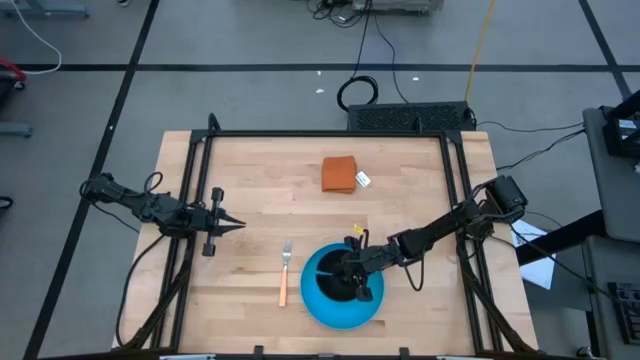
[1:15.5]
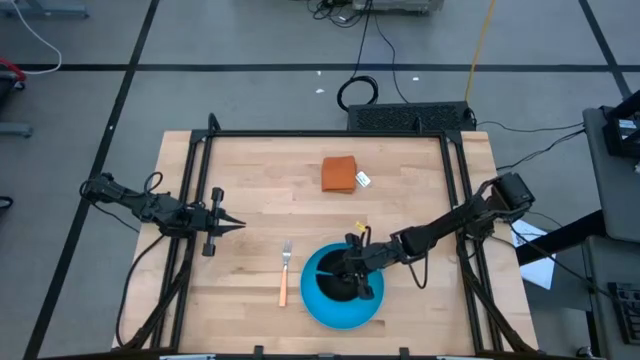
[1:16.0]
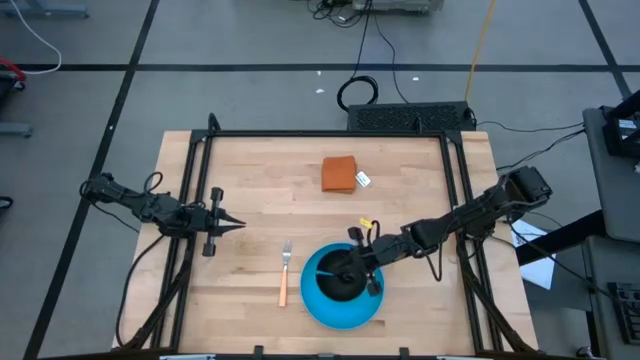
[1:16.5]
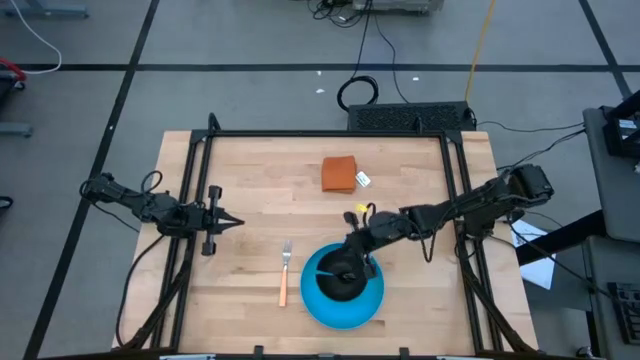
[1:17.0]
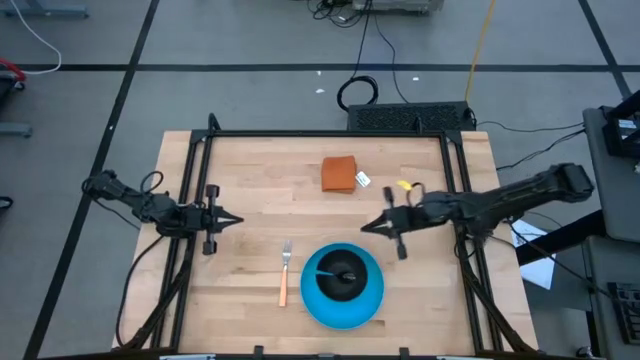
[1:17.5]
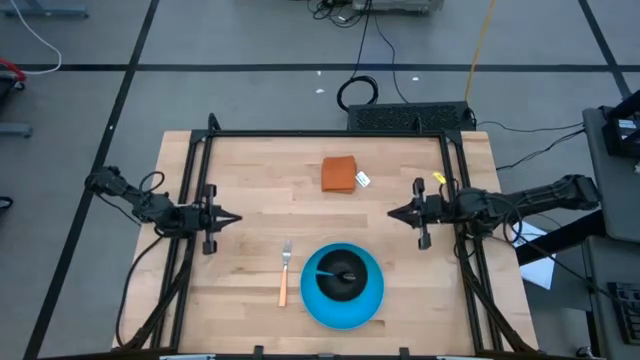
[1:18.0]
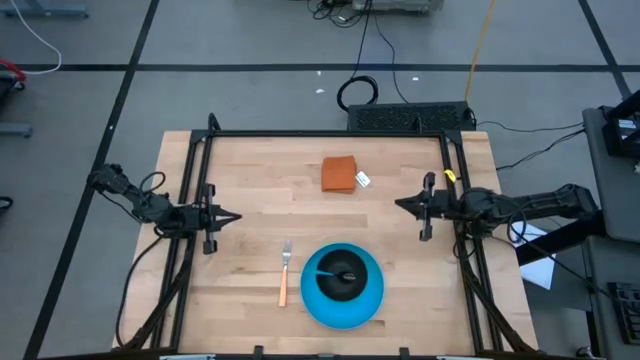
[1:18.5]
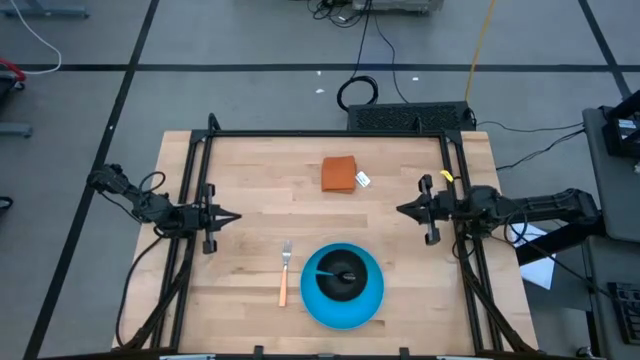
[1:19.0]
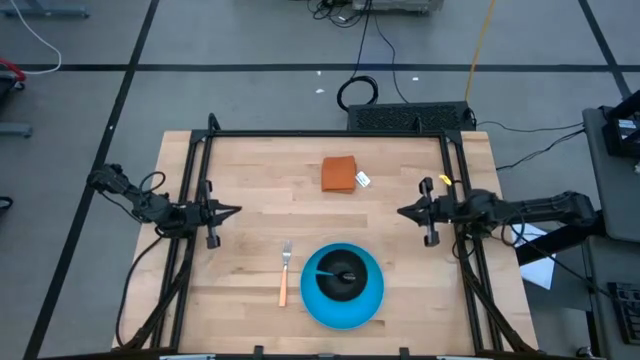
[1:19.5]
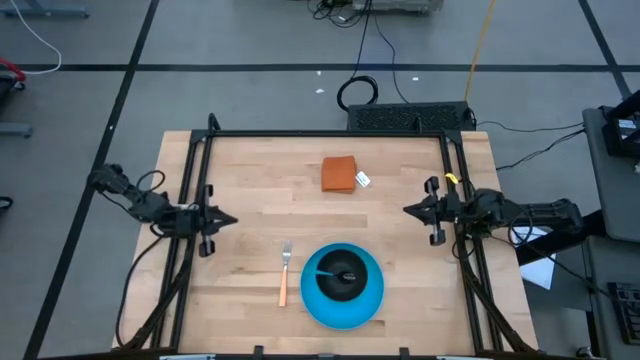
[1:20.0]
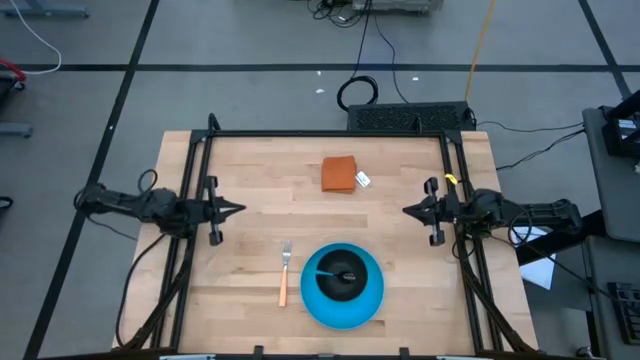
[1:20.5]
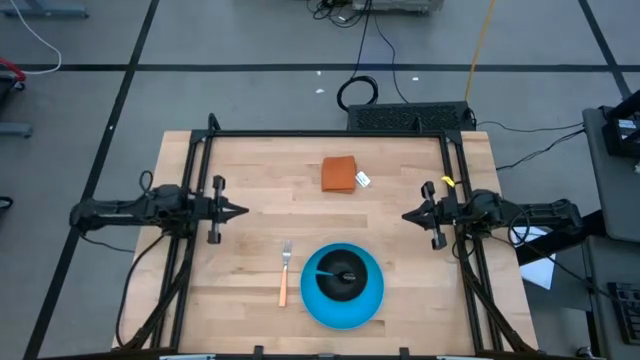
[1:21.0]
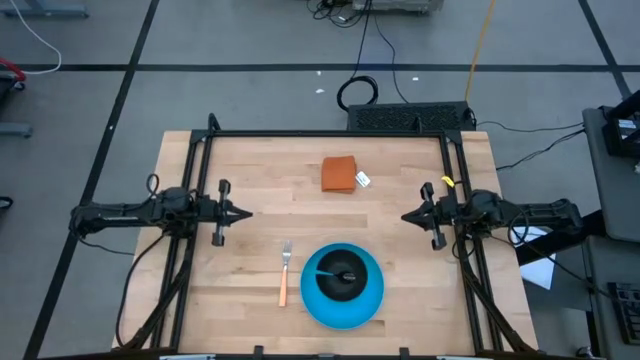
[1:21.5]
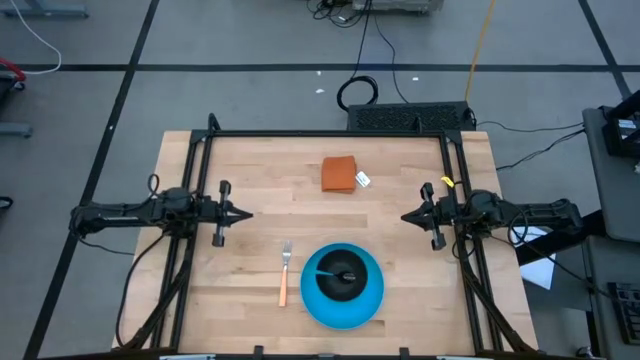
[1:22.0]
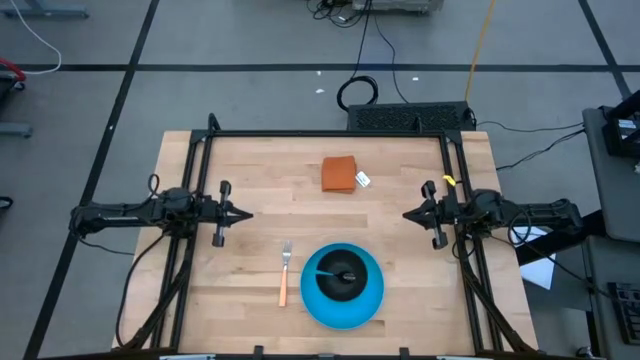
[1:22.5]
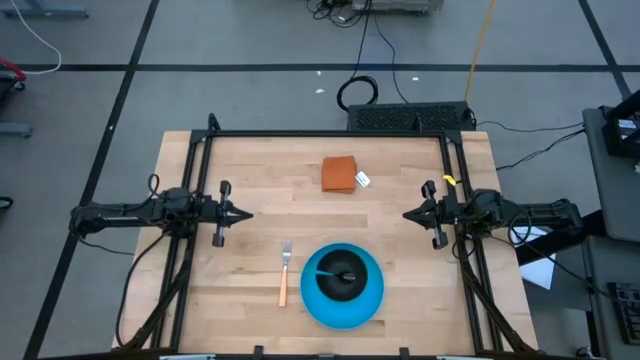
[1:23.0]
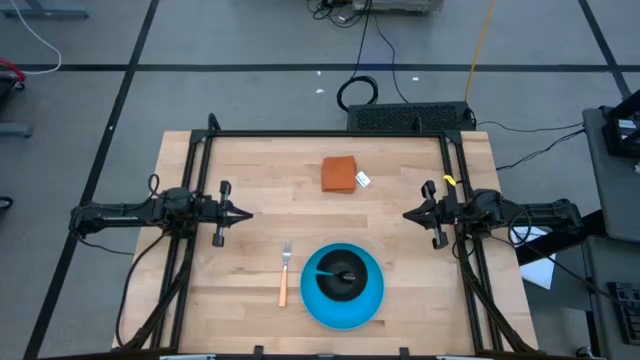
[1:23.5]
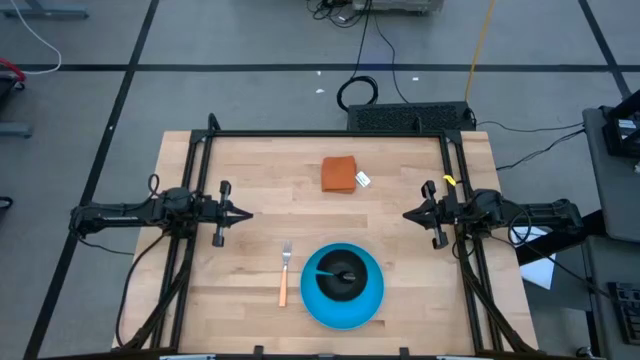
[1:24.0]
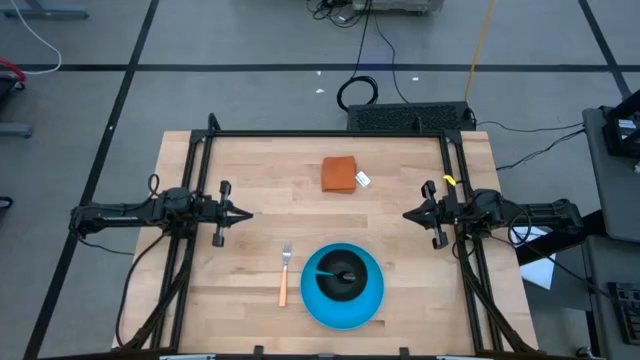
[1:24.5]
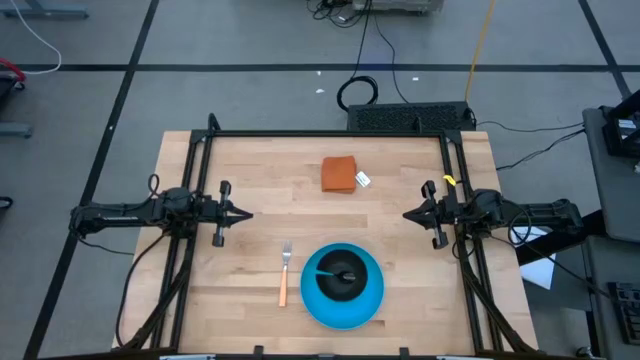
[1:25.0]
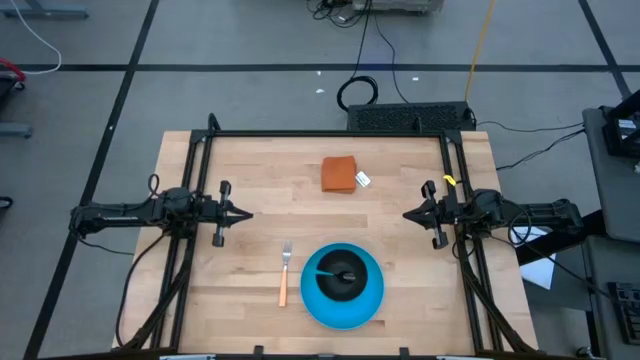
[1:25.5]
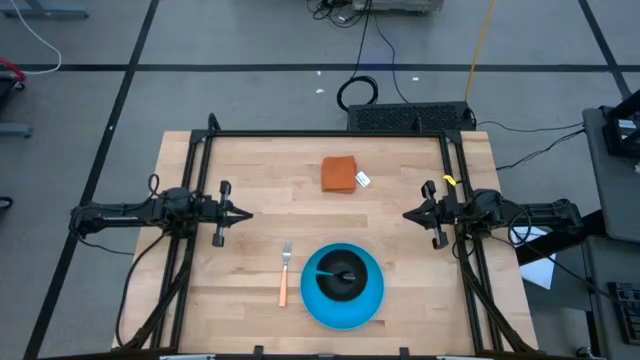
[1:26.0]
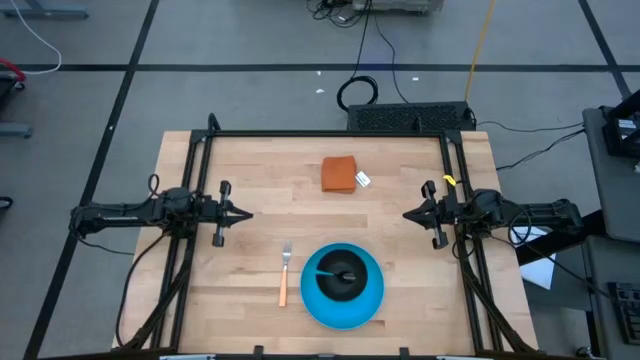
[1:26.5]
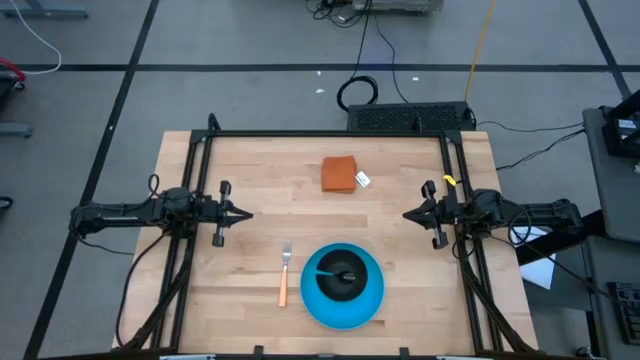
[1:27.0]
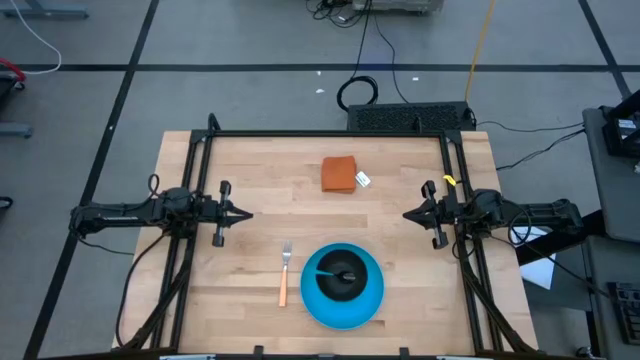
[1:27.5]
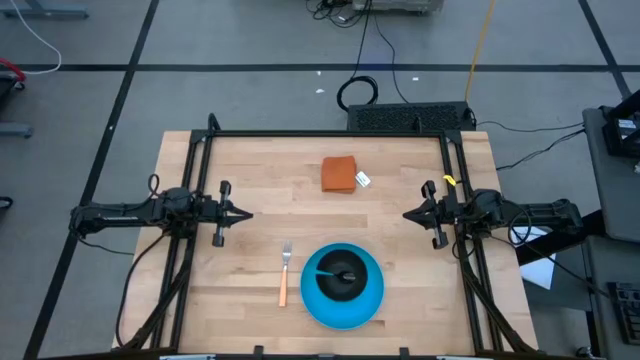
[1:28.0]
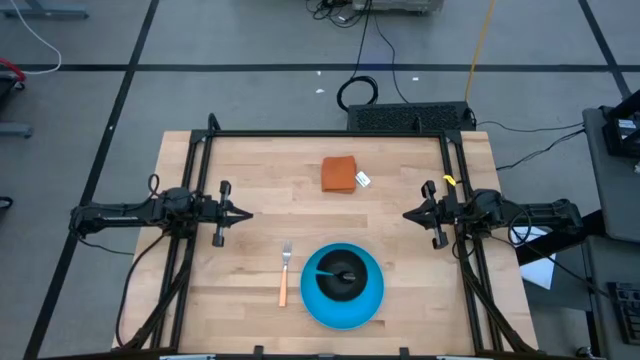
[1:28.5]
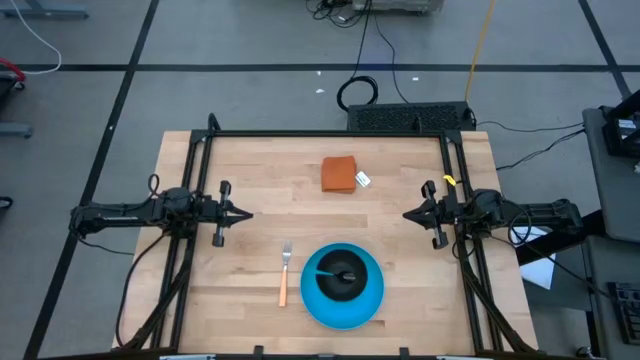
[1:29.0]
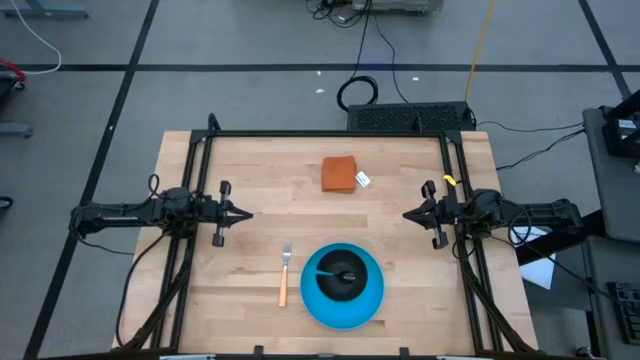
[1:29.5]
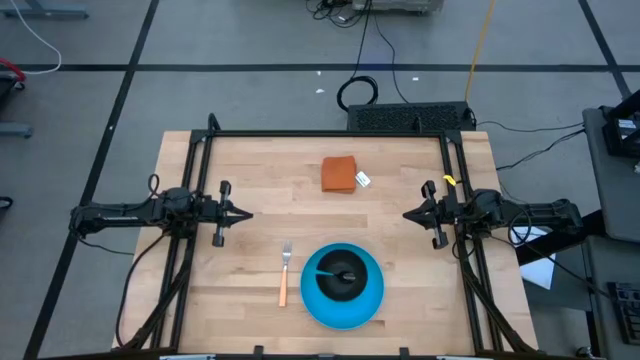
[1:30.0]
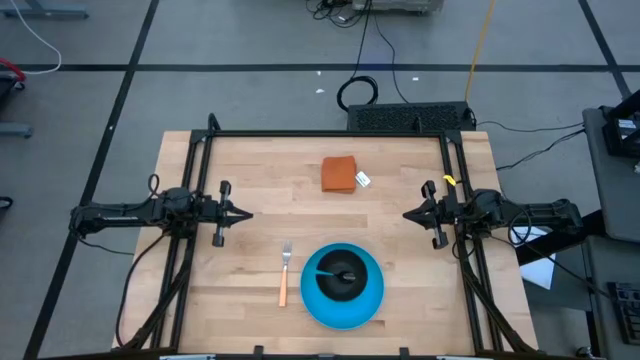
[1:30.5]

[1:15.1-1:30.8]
Task: Set table place
Return to Home Position

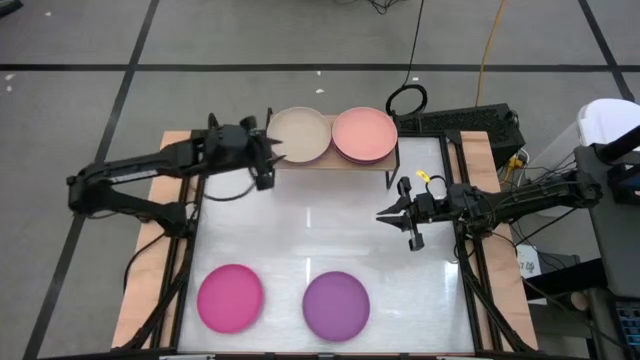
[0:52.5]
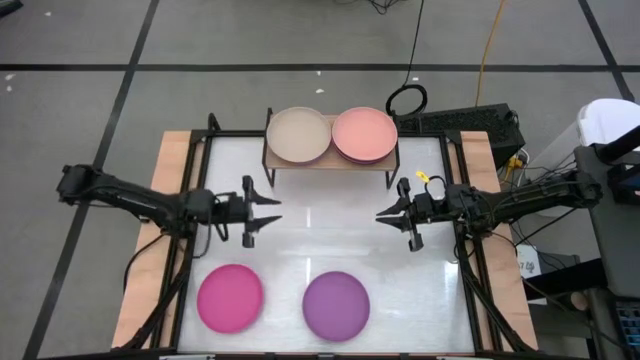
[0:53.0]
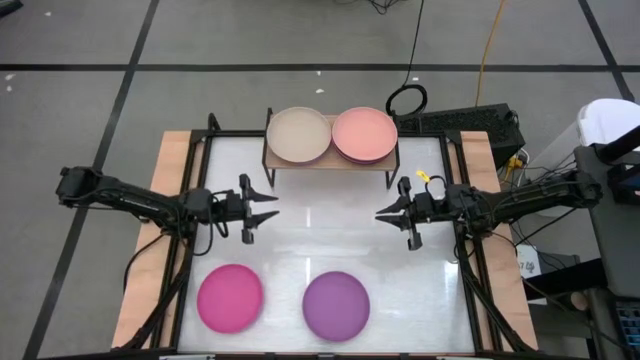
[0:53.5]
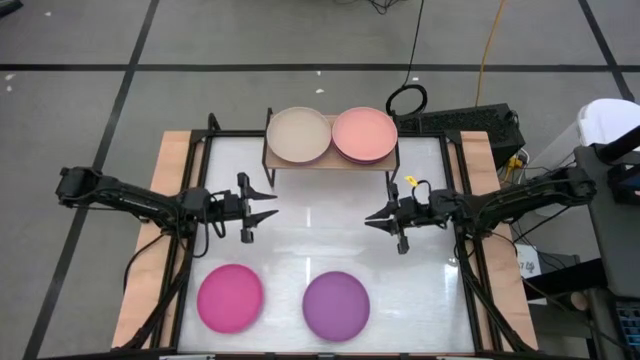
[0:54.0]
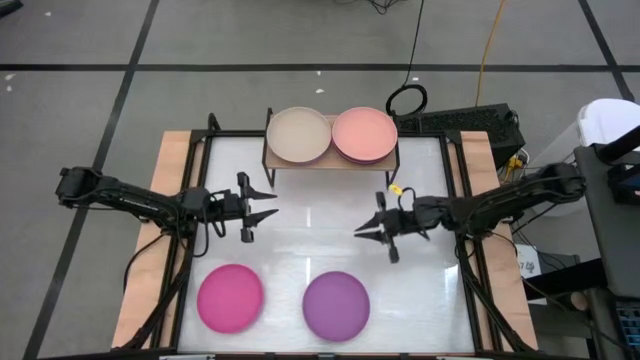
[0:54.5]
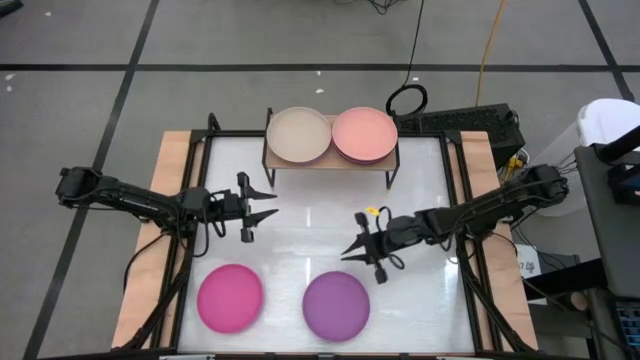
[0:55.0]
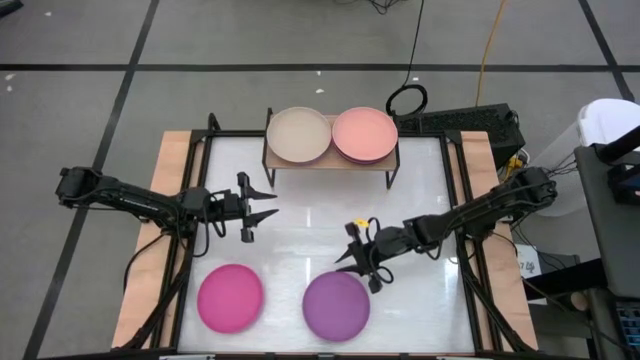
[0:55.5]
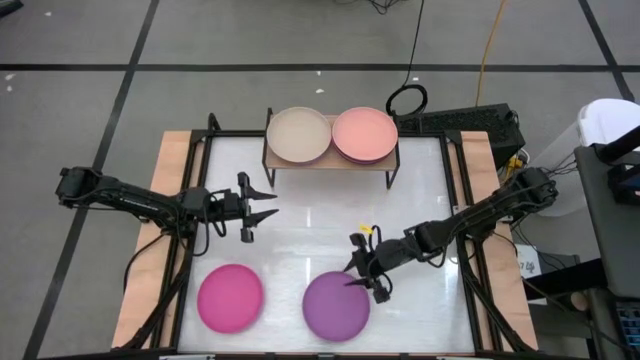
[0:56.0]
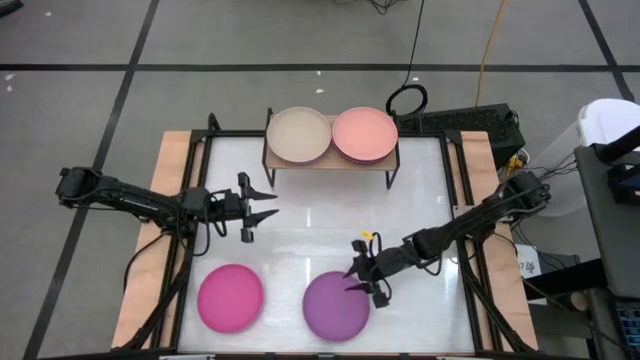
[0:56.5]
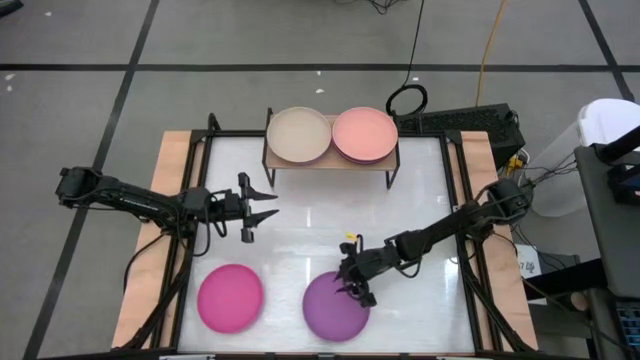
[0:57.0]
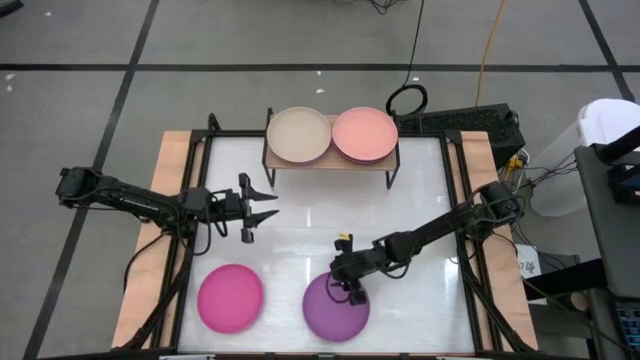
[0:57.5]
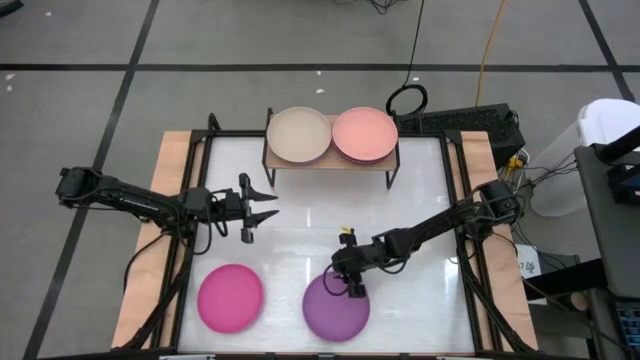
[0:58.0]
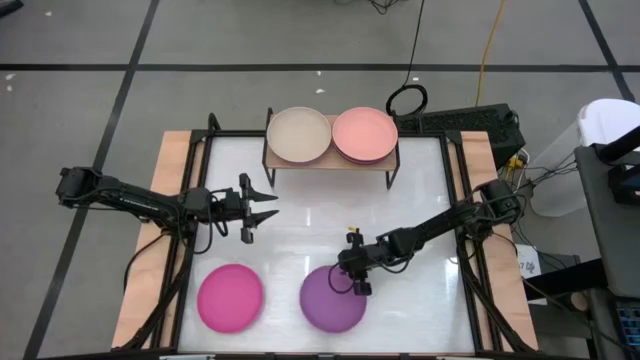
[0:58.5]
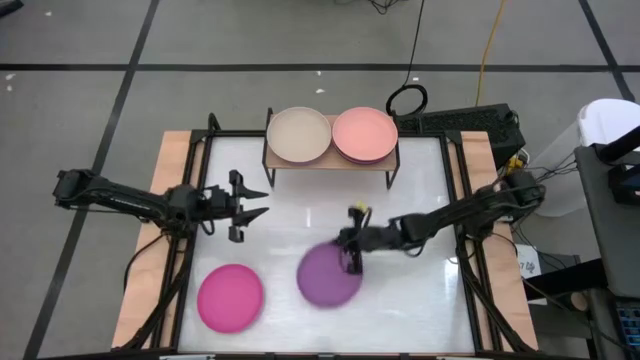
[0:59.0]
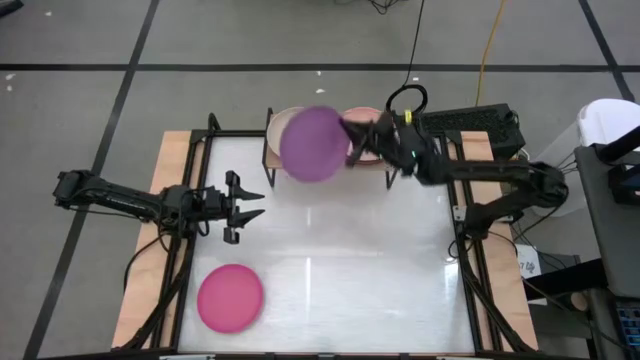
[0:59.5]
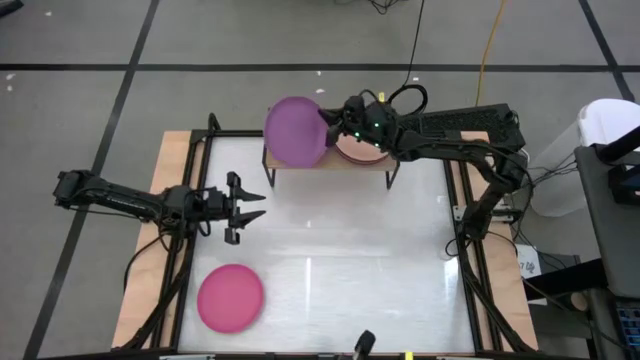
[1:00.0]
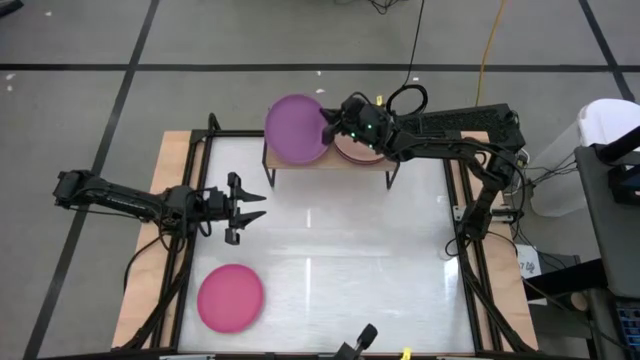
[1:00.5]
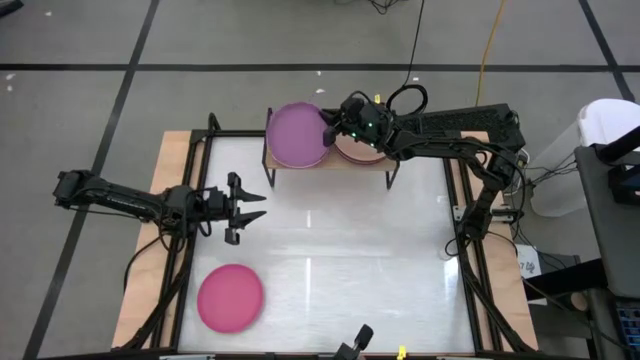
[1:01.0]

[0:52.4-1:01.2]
Task: Place and stack plates onto a shelf
Stack the purple plate on the brown plate on the shelf
